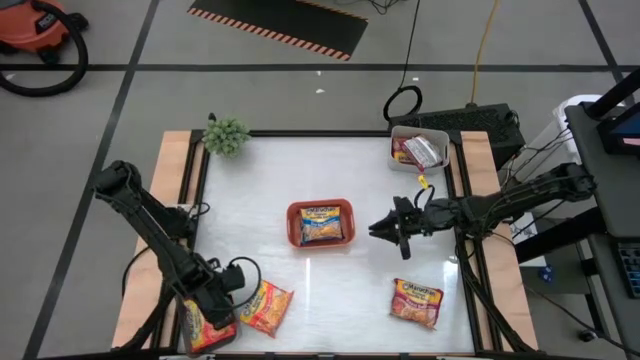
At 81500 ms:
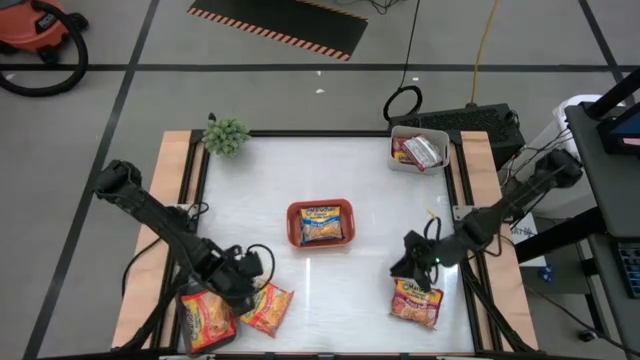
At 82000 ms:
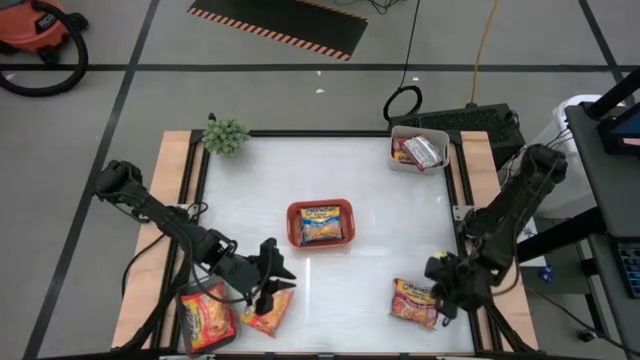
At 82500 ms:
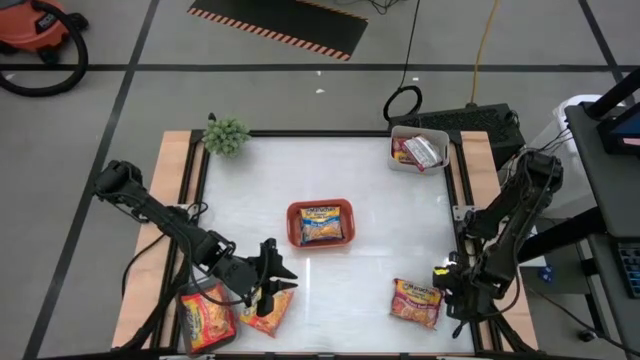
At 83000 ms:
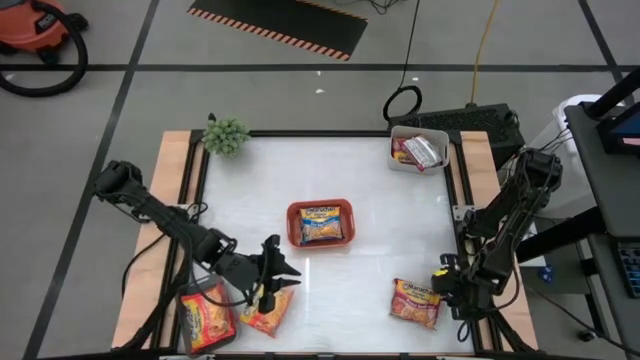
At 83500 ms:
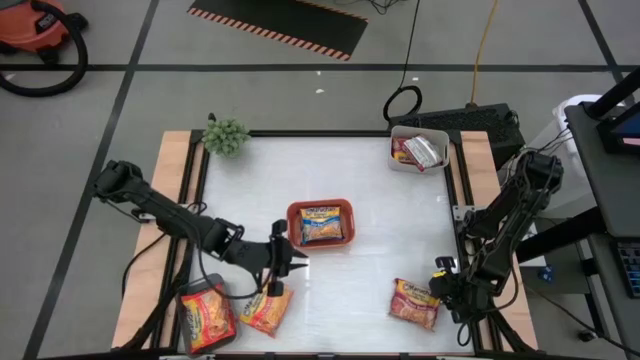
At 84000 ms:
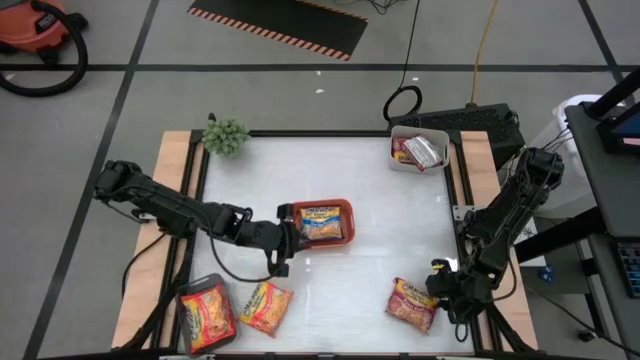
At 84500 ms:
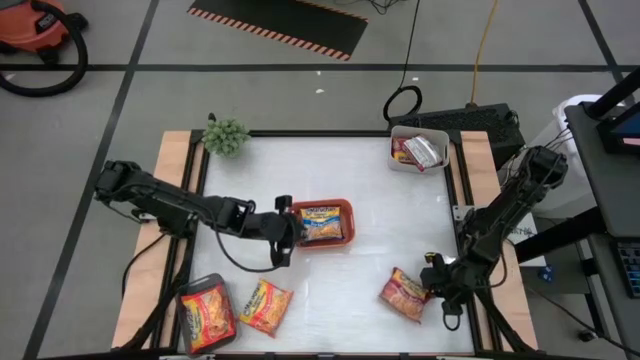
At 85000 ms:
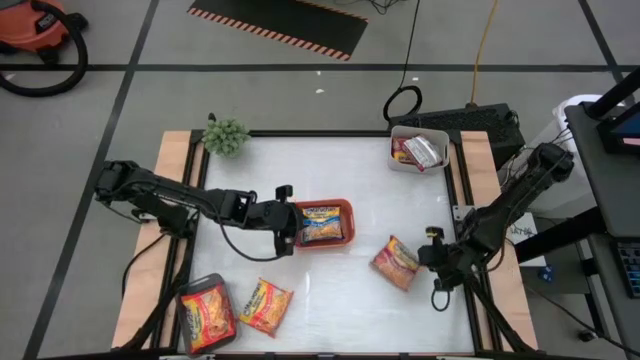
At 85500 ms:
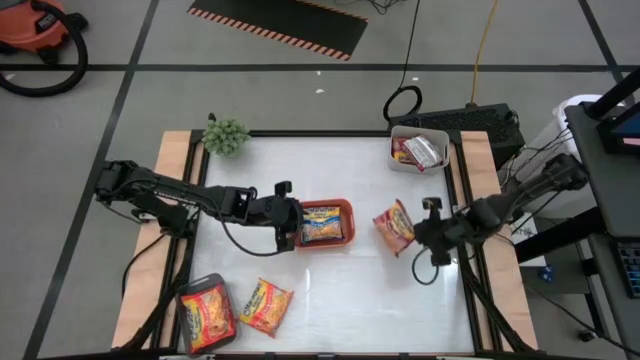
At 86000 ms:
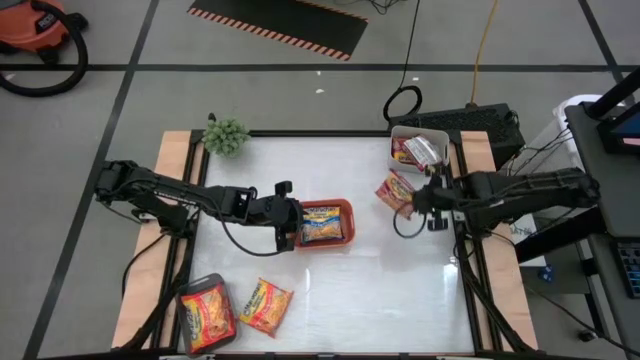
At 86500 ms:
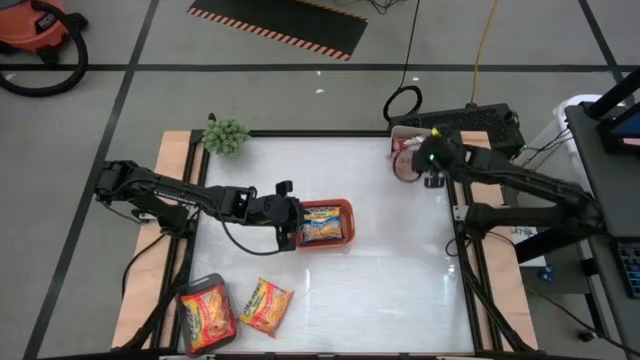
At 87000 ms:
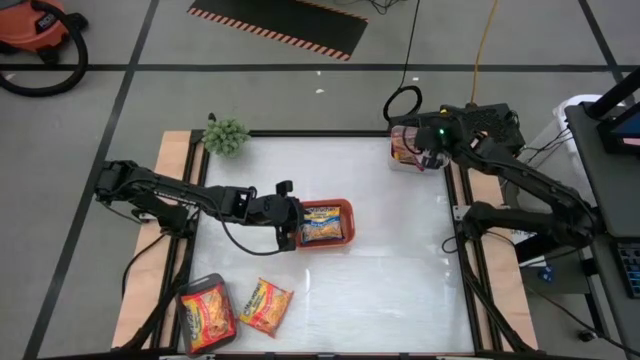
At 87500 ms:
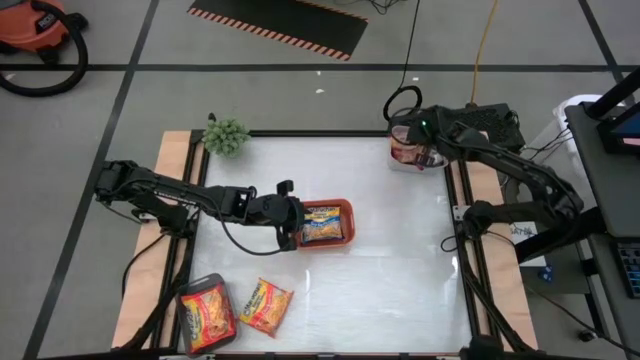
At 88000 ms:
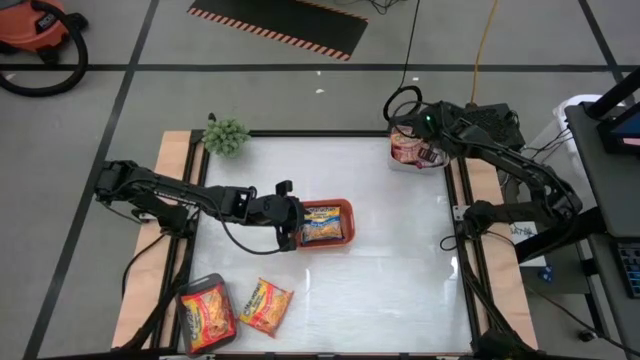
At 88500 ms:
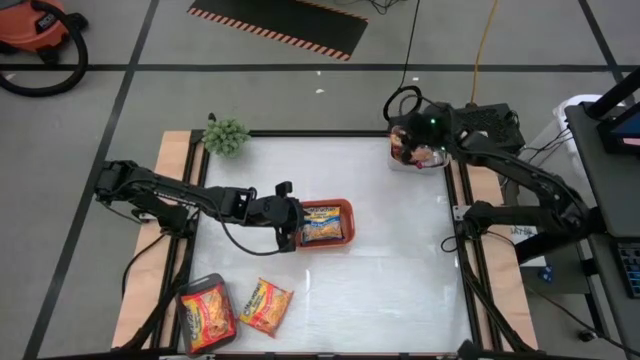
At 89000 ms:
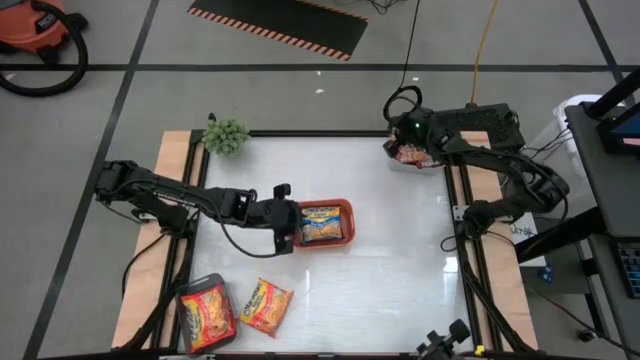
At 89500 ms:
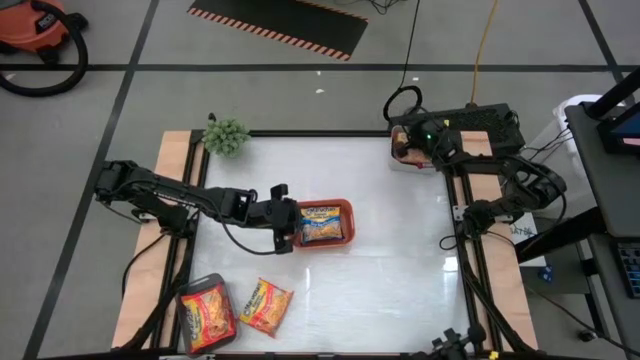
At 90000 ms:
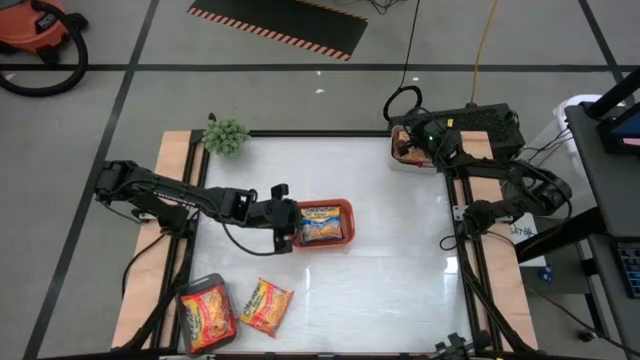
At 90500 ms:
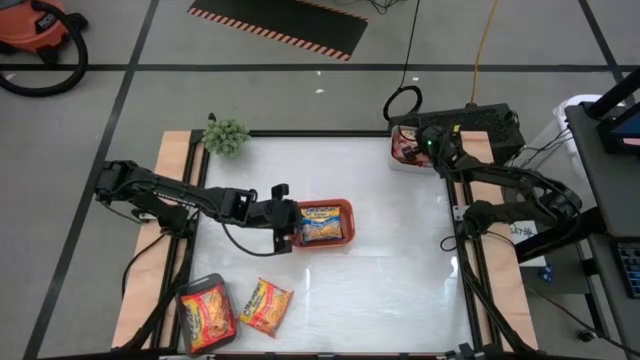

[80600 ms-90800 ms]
Task: Sort Maruchan noodles
Put the red noodle pack into the gray bin

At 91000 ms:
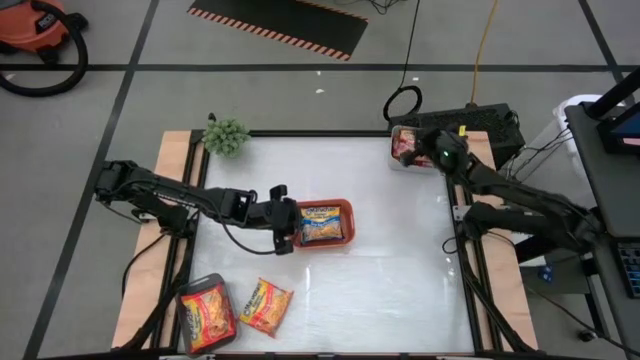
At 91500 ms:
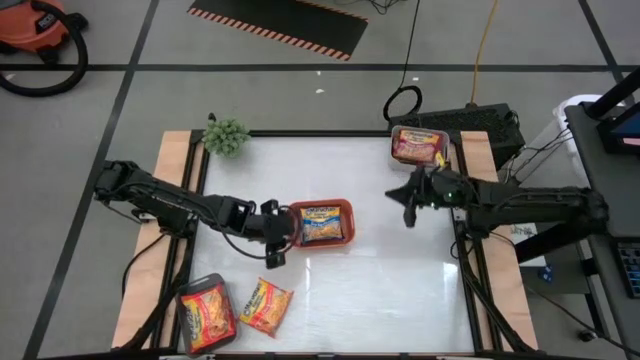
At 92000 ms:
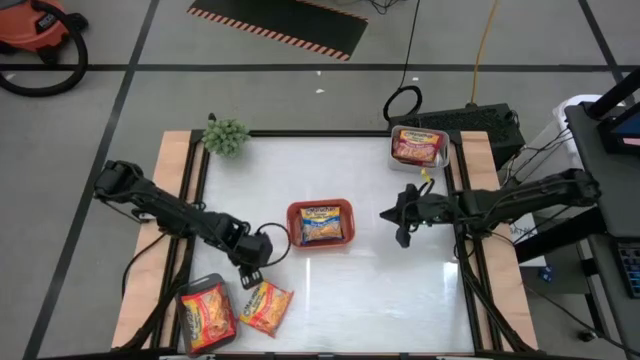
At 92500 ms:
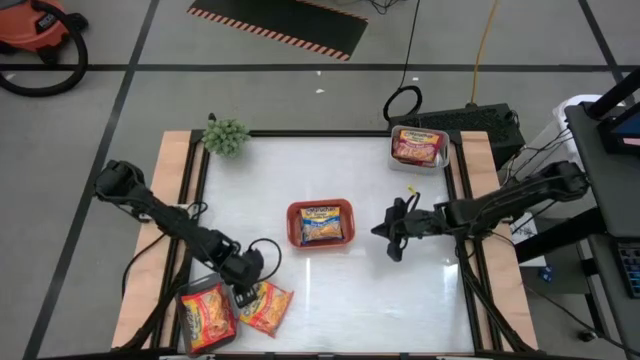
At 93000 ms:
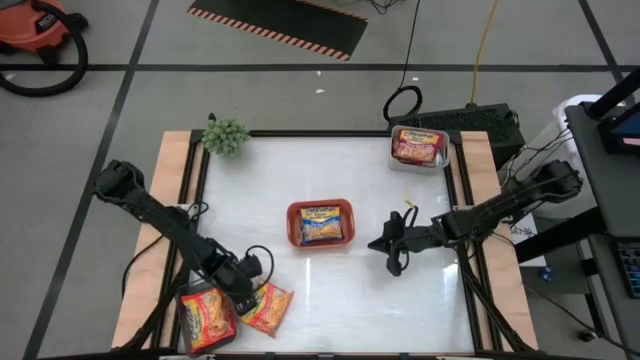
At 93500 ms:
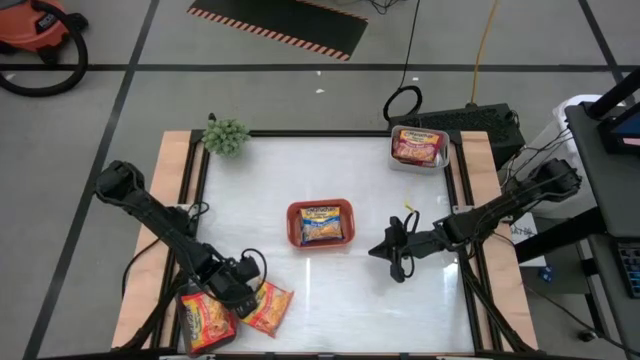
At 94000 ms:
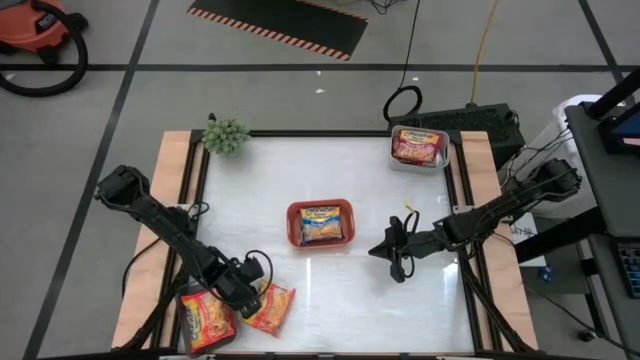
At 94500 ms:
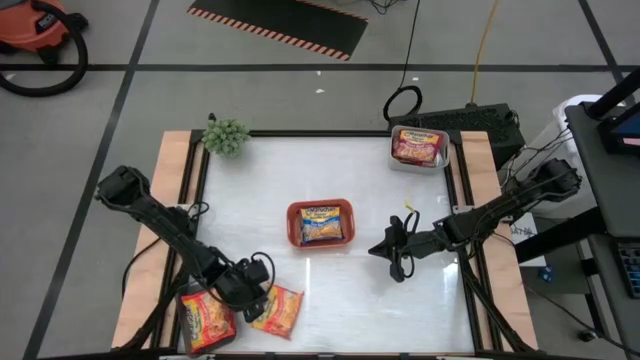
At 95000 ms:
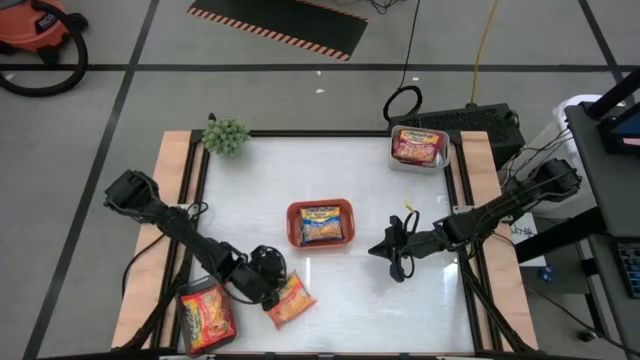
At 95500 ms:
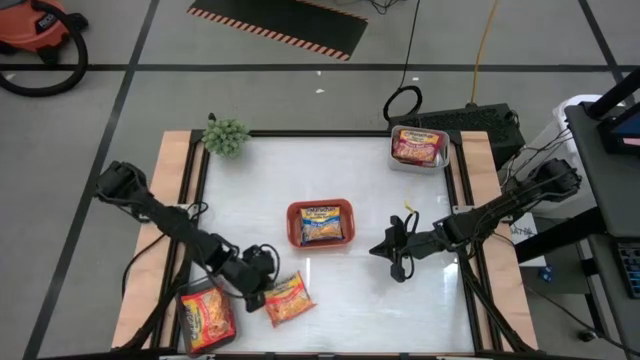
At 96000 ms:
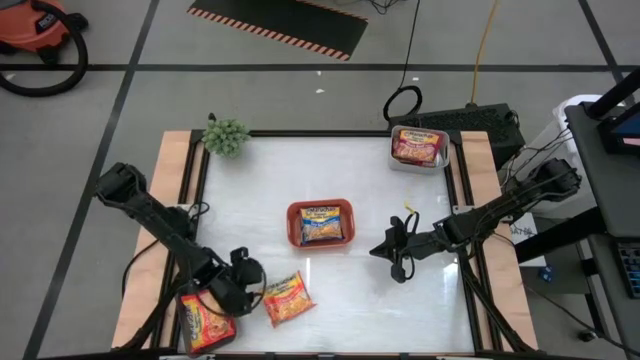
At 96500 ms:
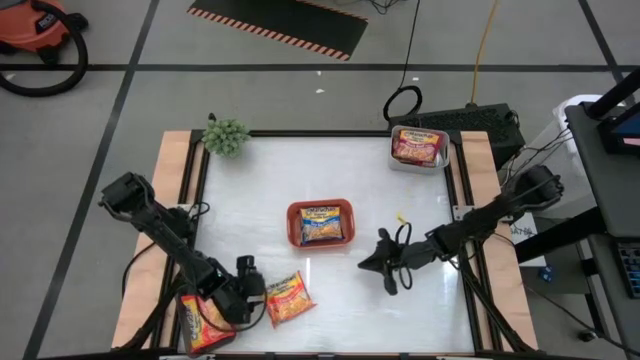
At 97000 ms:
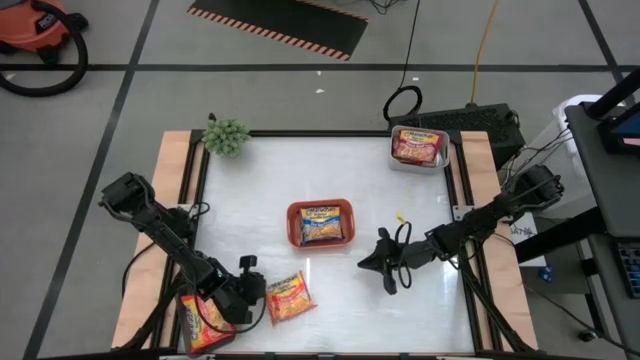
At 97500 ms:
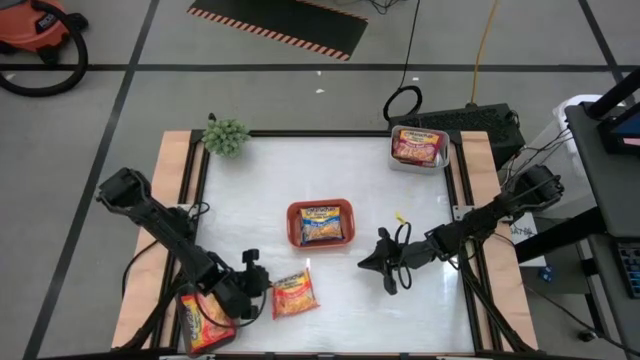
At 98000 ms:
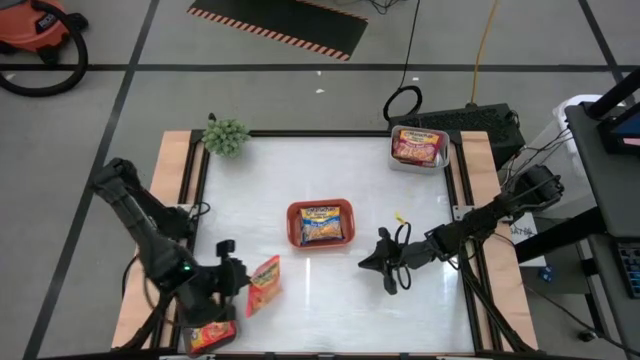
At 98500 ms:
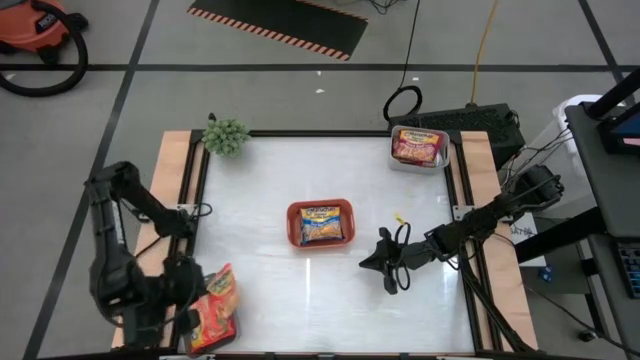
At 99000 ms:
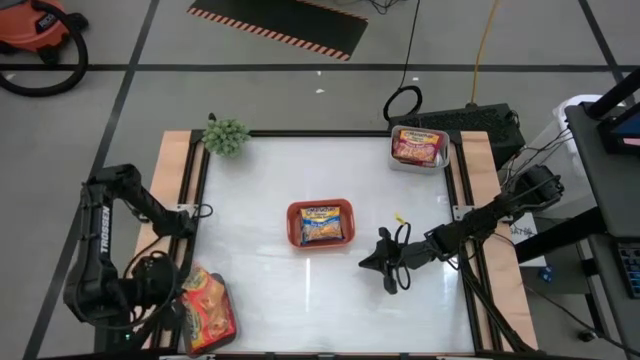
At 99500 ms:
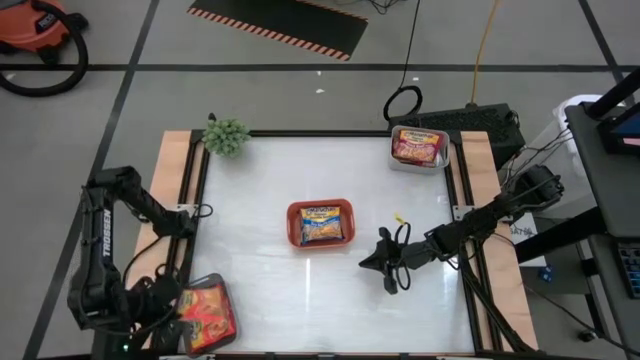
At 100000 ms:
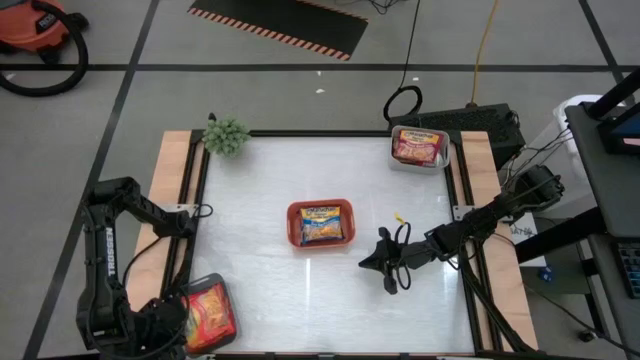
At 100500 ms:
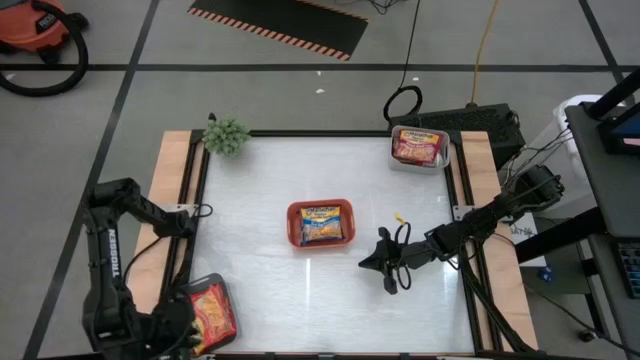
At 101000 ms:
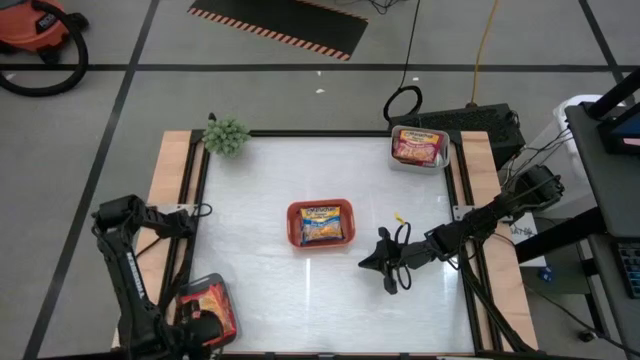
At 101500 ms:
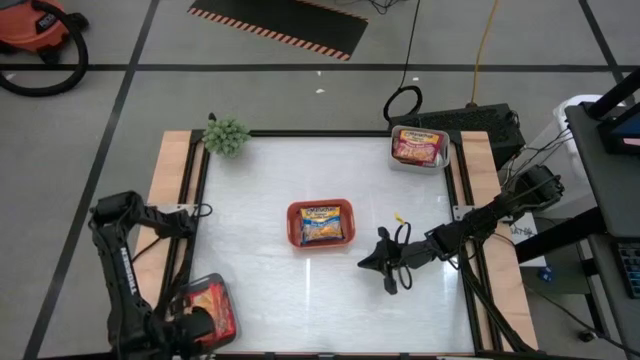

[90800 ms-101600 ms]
Put the orange noodle pack into the black bin
